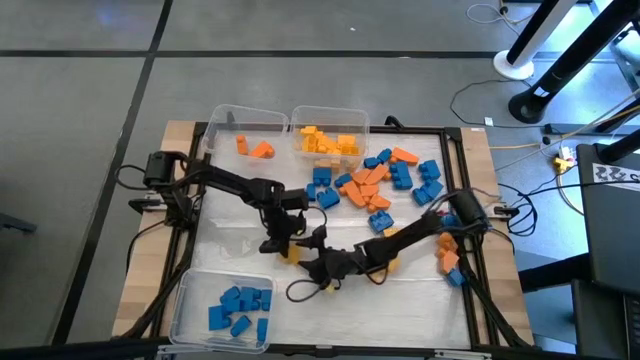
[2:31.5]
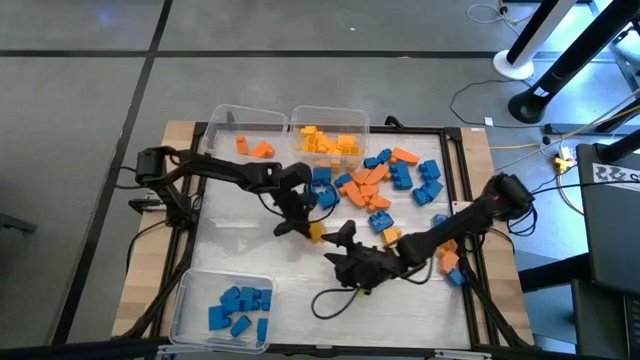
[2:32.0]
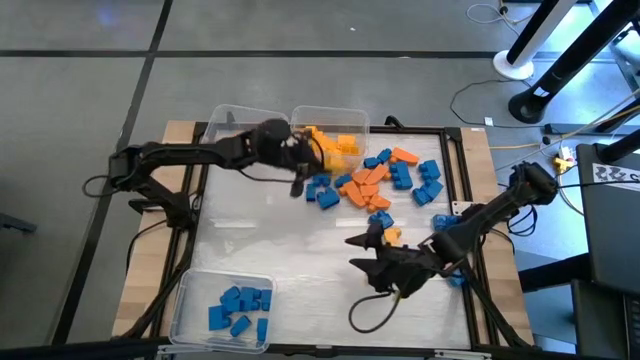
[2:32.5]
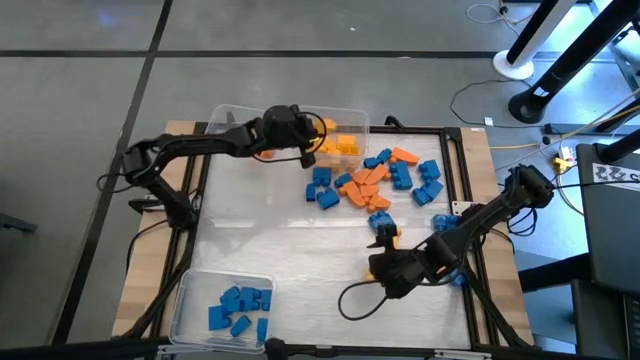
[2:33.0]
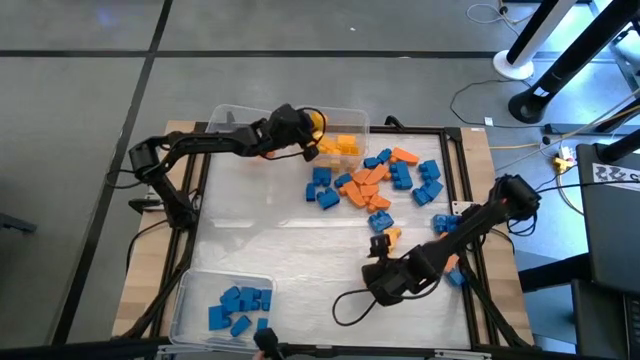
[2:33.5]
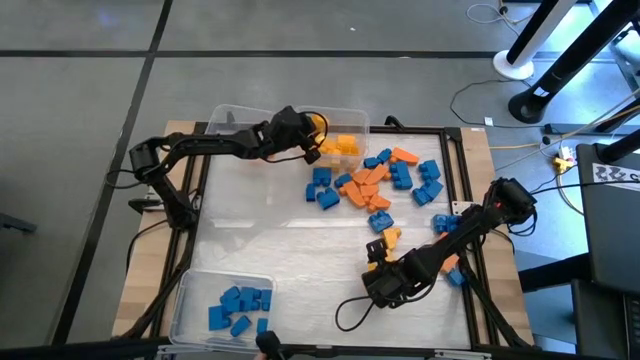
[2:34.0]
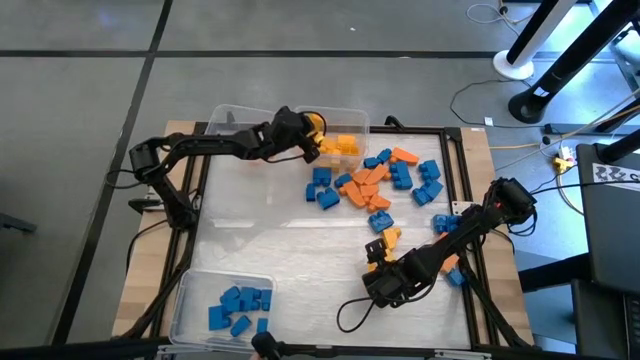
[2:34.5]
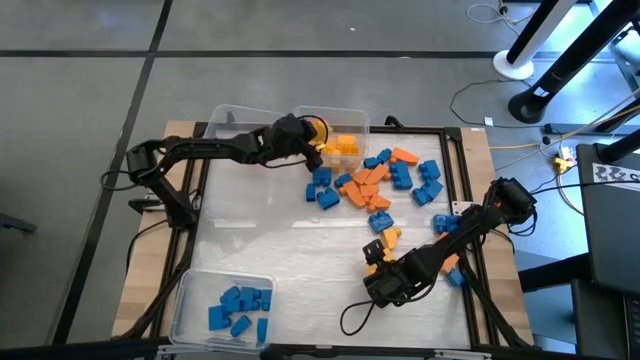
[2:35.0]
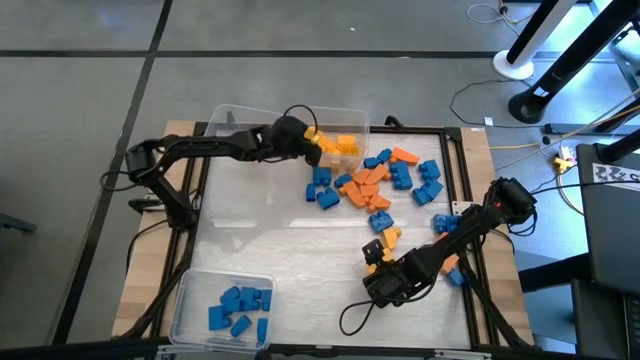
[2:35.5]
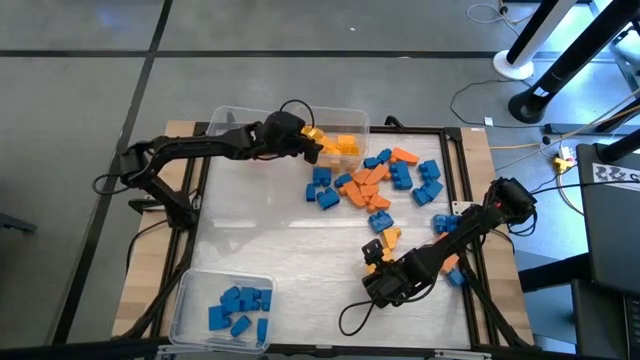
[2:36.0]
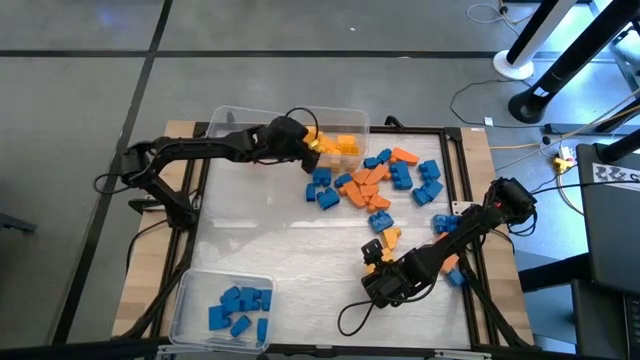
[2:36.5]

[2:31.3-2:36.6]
Task: Sort blocks
Put the yellow game piece into the top right transparent bin

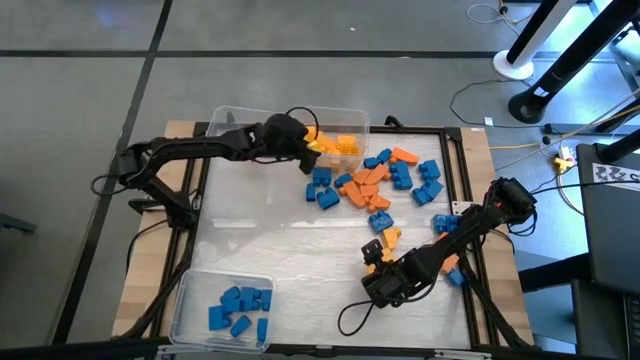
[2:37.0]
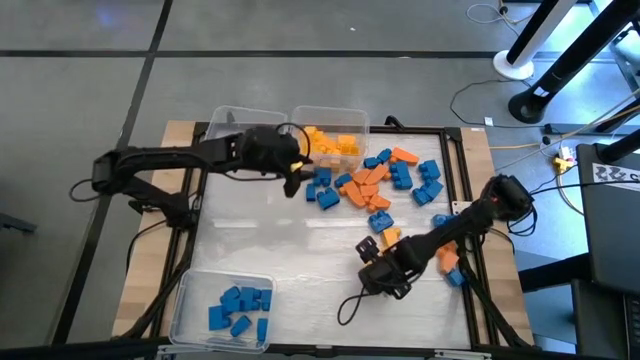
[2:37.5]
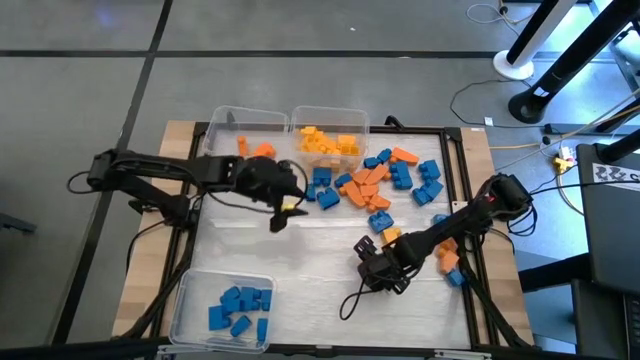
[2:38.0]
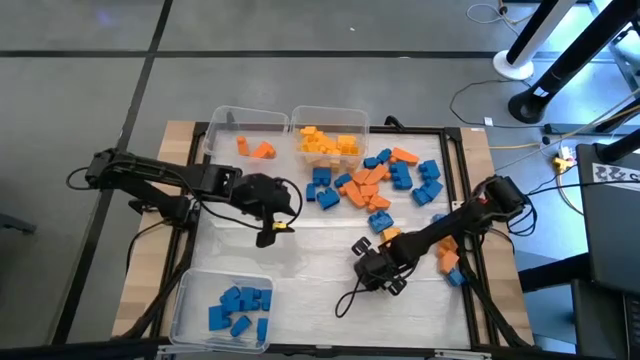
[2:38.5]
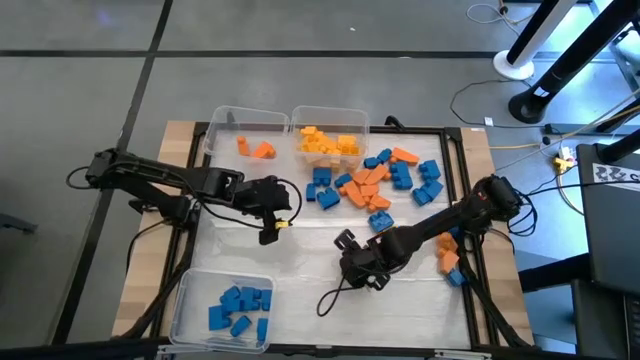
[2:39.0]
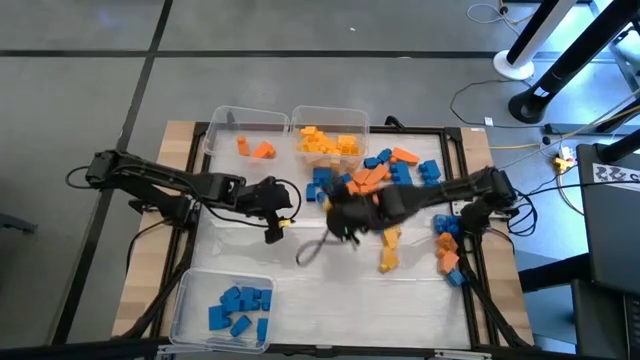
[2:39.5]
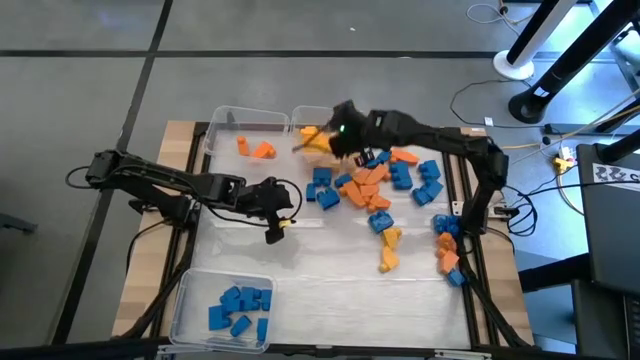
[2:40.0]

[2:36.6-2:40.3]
Put the yellow game piece into the top right transparent bin

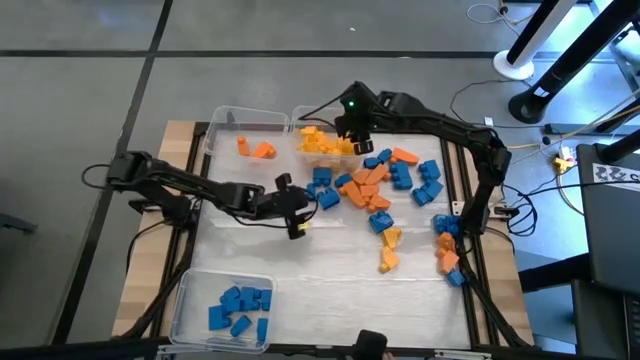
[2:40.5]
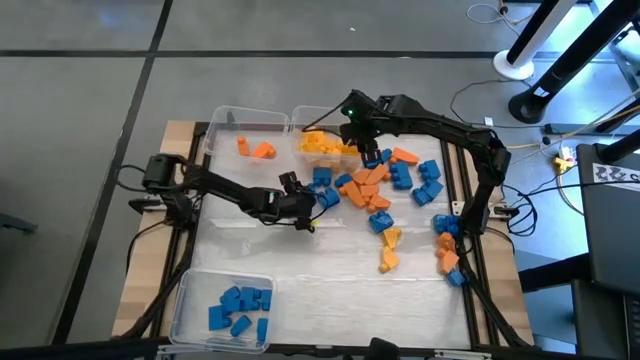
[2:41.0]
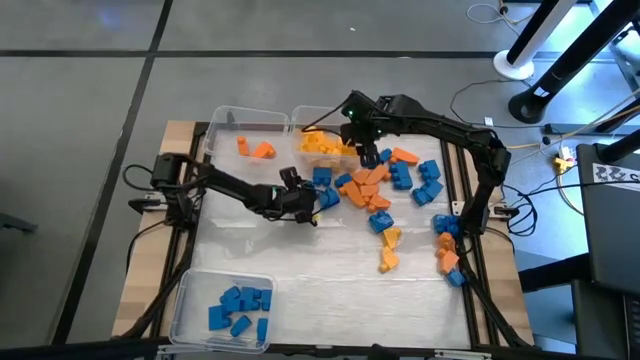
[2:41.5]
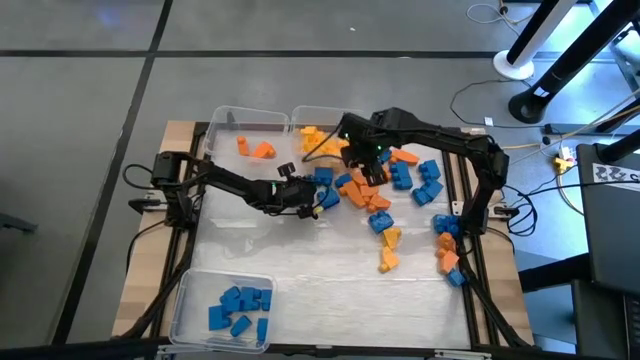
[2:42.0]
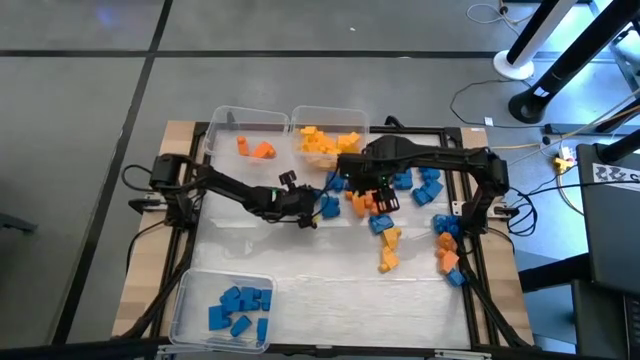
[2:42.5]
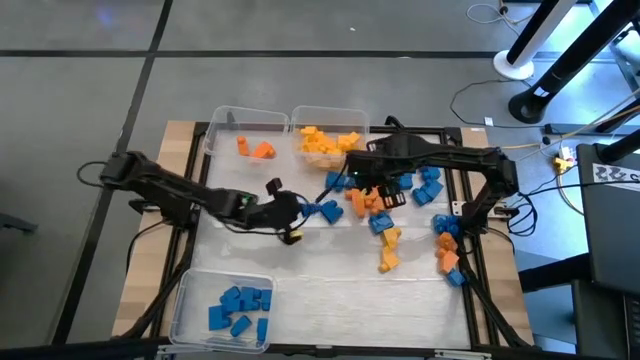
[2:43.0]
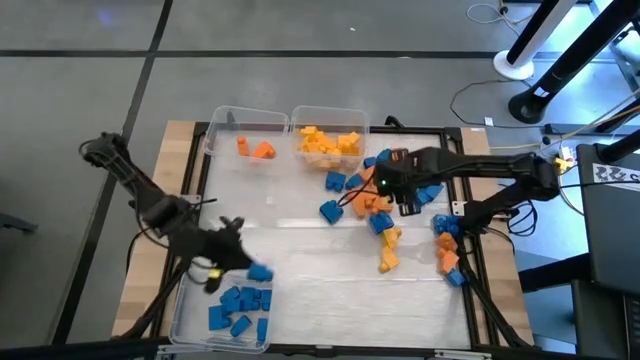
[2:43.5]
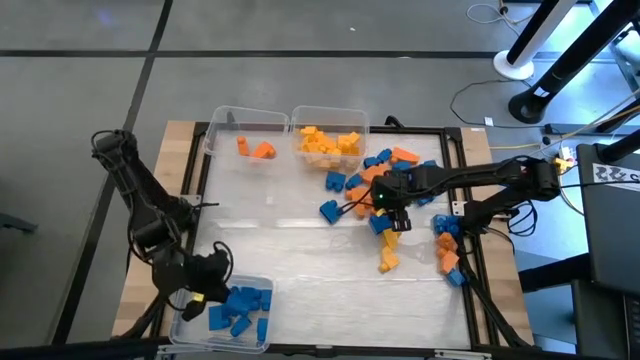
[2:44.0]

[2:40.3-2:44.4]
Put the blue game piece into the bottom transparent bin

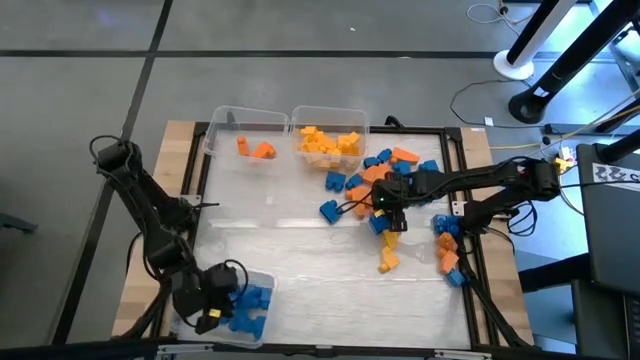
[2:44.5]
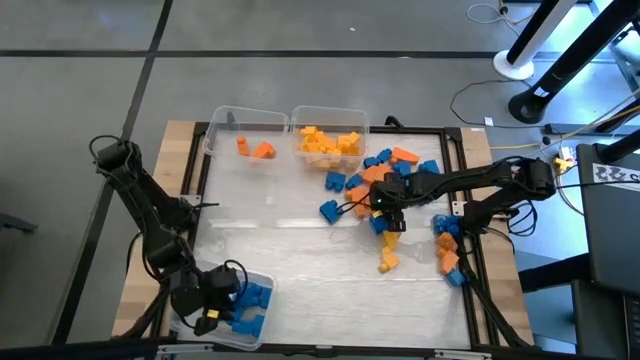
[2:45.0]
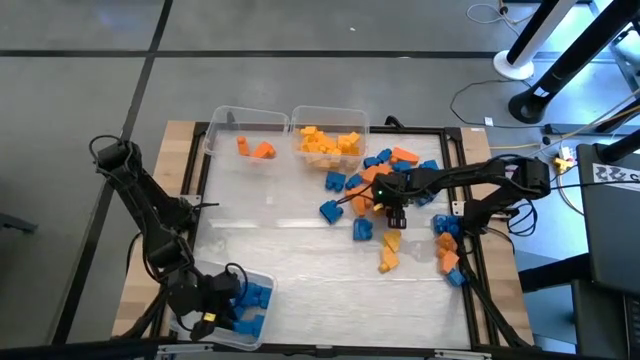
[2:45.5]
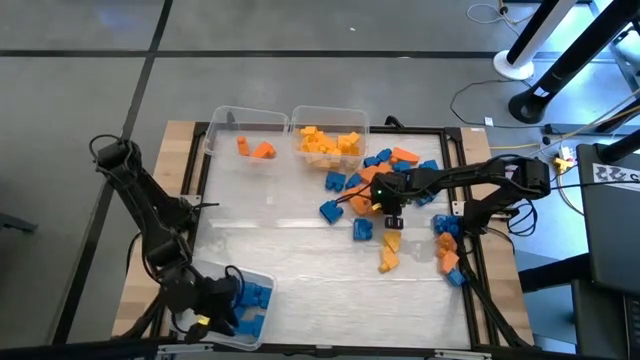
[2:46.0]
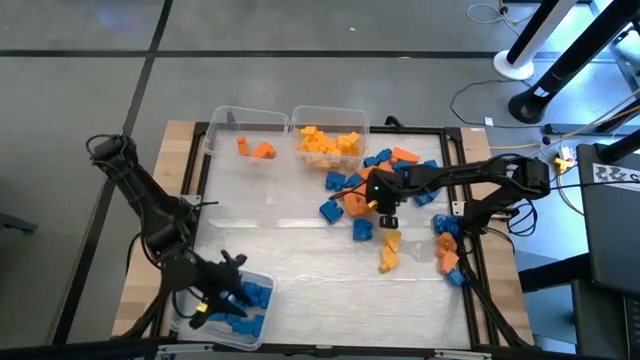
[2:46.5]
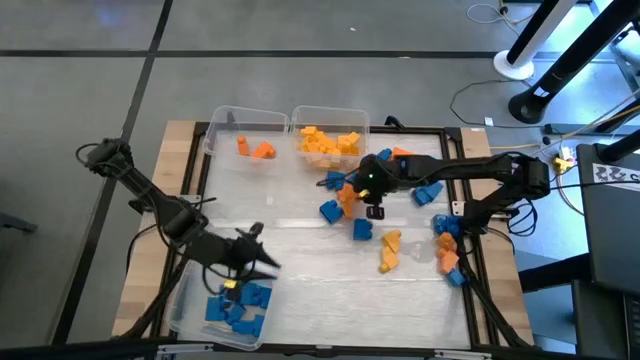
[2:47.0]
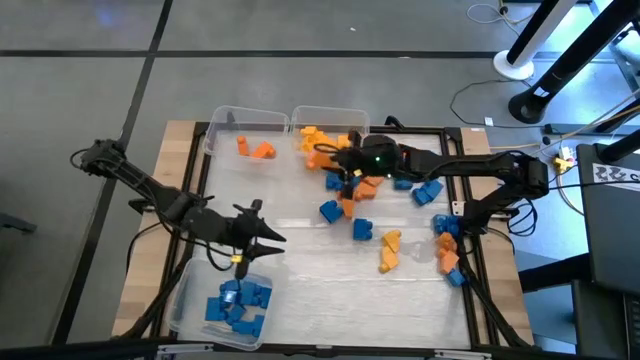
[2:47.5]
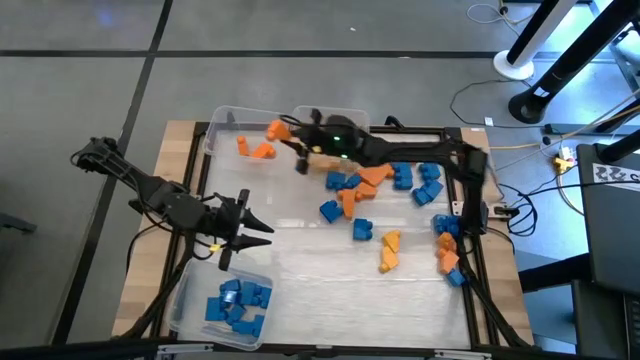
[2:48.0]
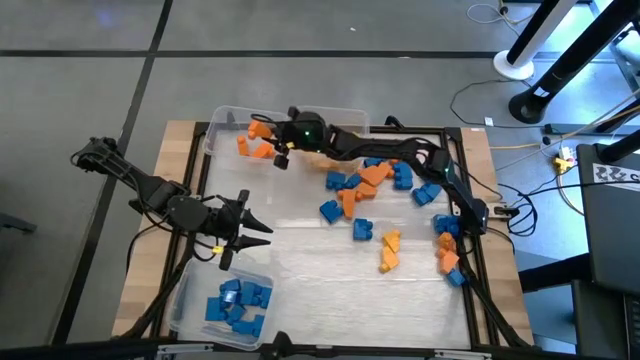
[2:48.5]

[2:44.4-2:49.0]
Put the orange game piece into the top left transparent bin

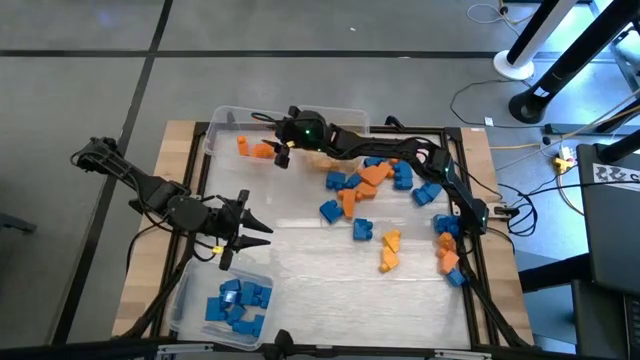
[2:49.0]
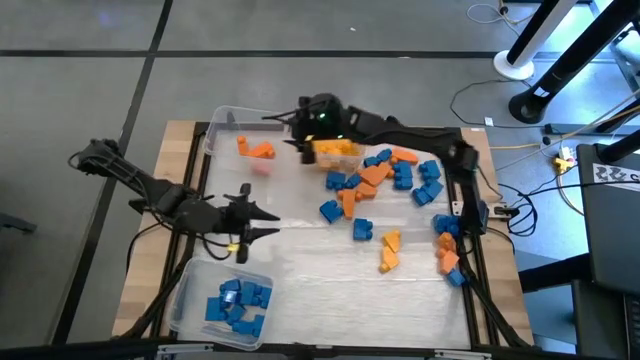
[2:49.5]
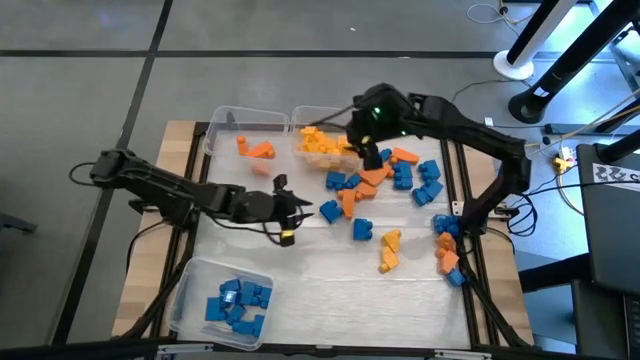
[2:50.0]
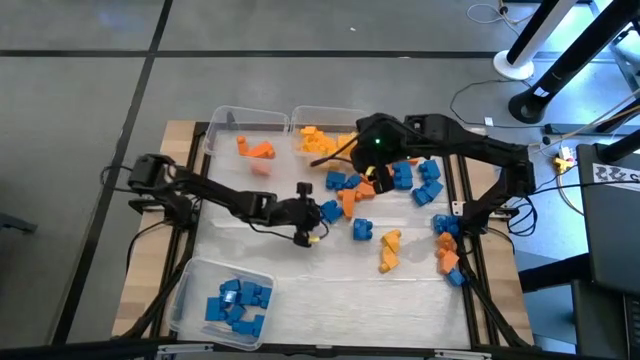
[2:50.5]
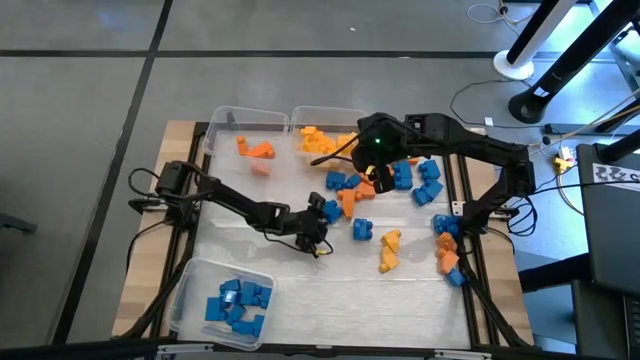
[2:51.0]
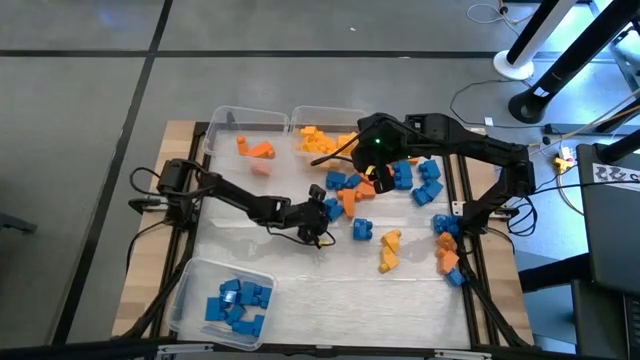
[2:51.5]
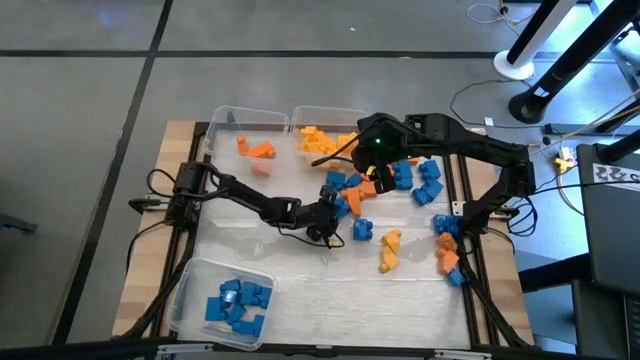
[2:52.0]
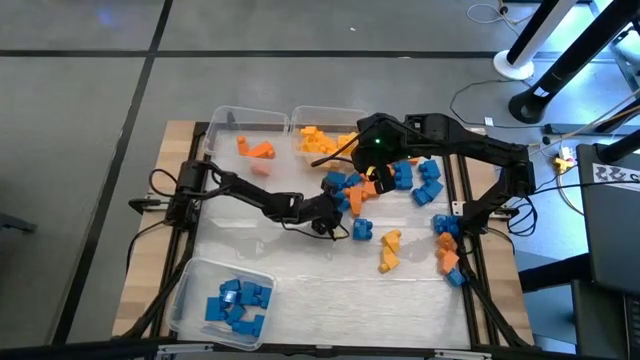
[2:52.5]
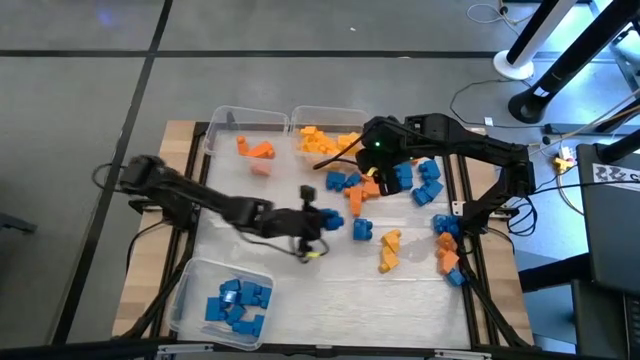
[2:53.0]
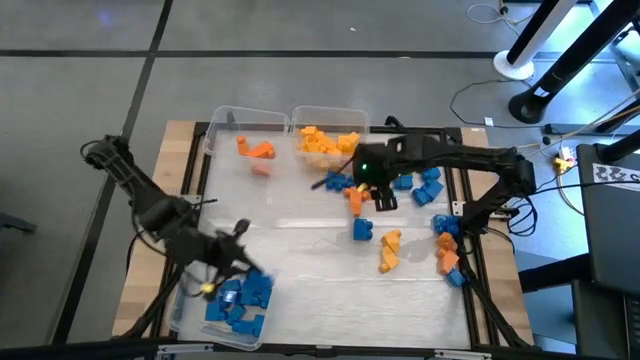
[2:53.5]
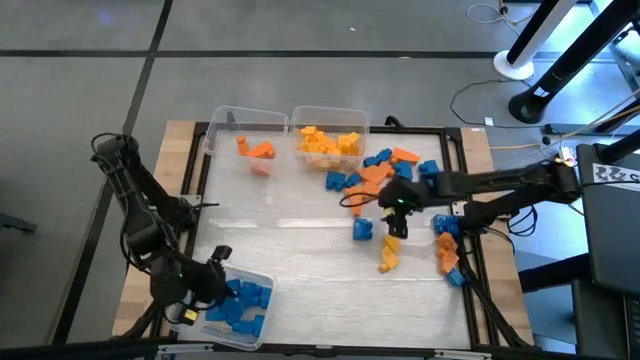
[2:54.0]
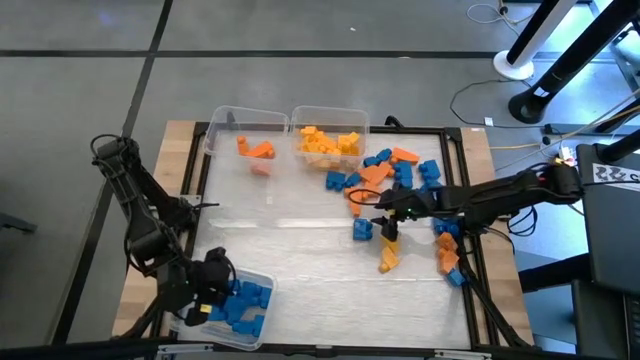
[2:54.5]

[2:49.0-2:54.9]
Put the blue game piece into the bottom transparent bin
